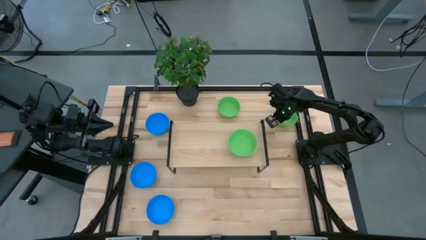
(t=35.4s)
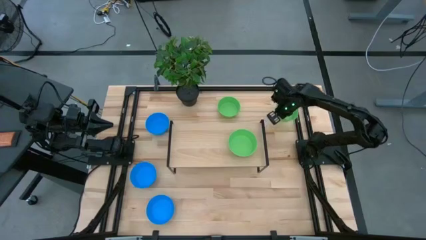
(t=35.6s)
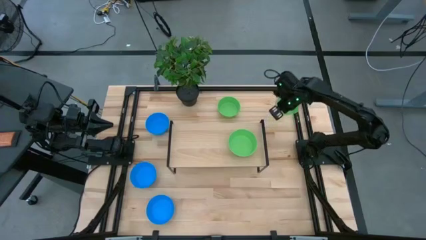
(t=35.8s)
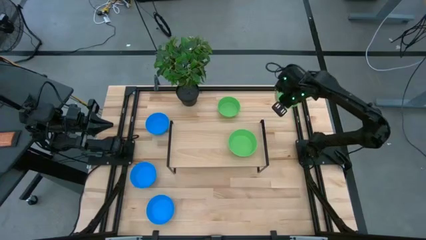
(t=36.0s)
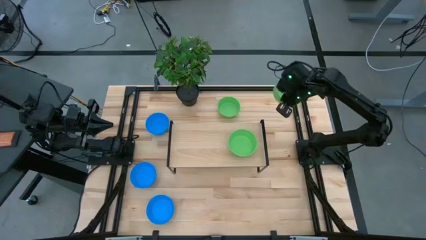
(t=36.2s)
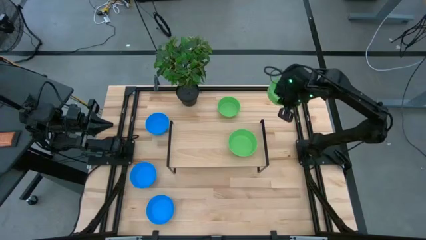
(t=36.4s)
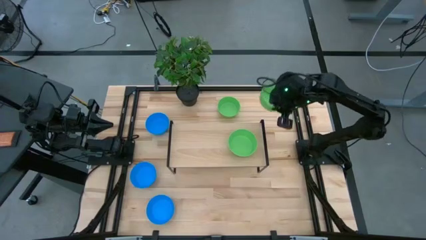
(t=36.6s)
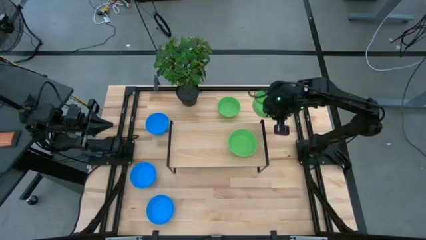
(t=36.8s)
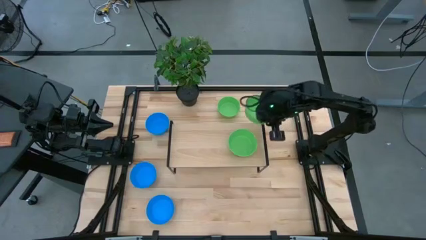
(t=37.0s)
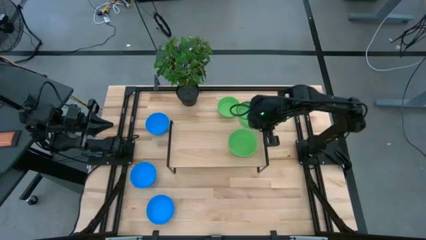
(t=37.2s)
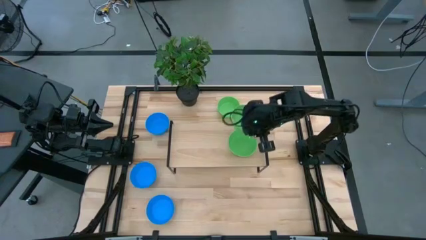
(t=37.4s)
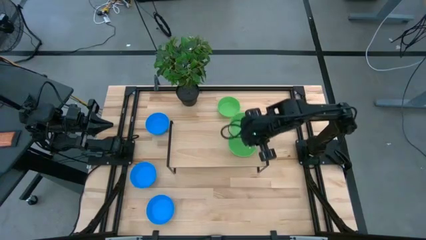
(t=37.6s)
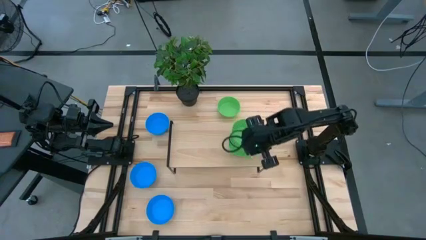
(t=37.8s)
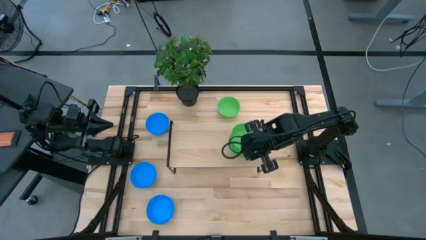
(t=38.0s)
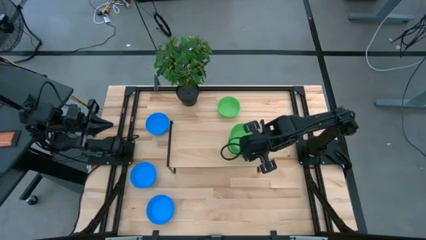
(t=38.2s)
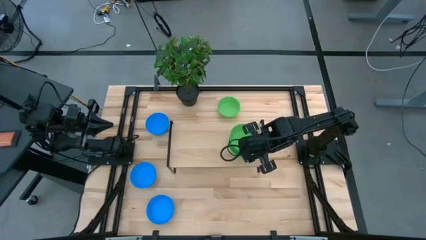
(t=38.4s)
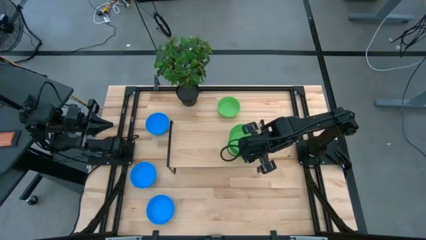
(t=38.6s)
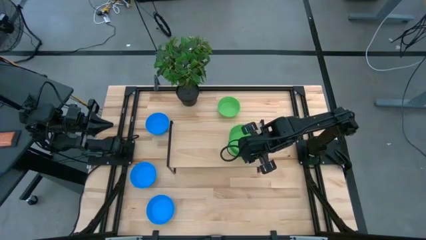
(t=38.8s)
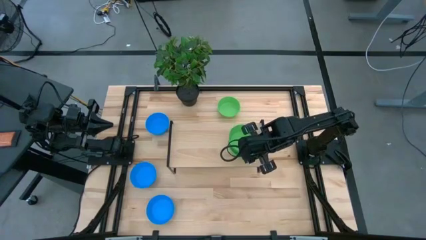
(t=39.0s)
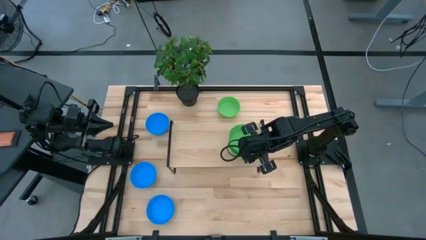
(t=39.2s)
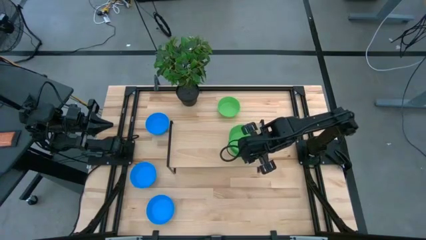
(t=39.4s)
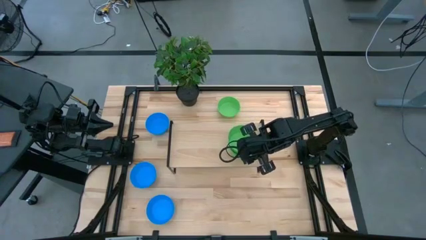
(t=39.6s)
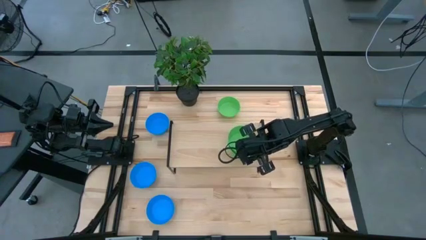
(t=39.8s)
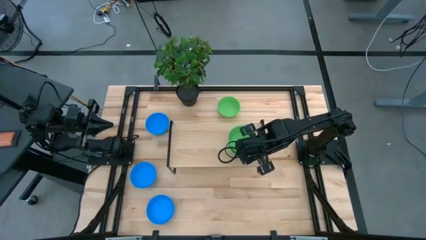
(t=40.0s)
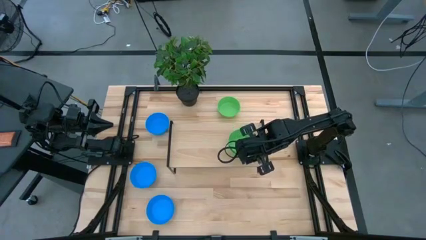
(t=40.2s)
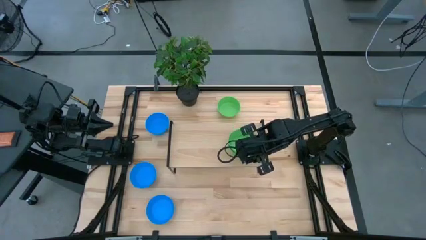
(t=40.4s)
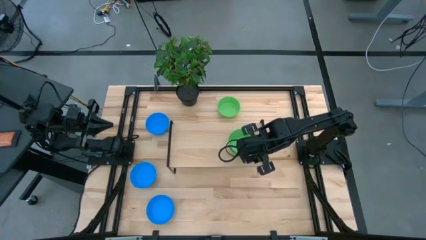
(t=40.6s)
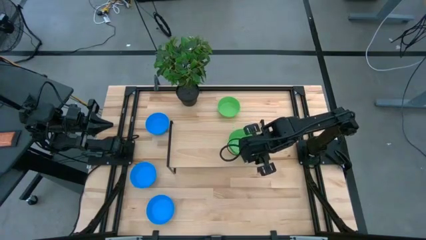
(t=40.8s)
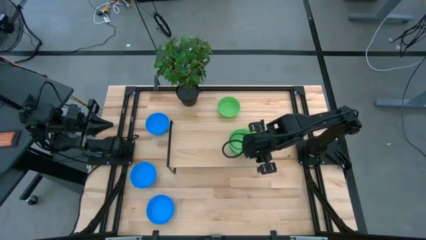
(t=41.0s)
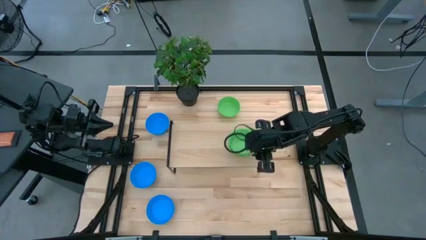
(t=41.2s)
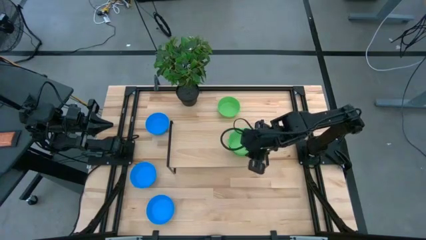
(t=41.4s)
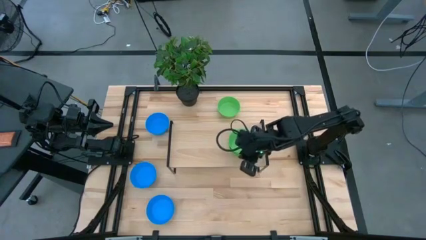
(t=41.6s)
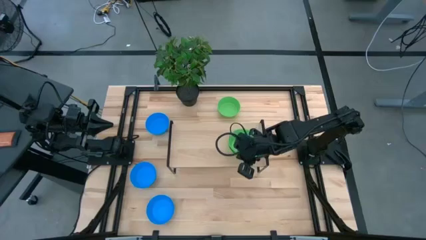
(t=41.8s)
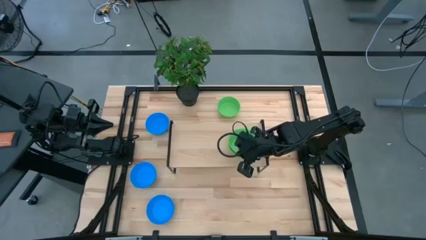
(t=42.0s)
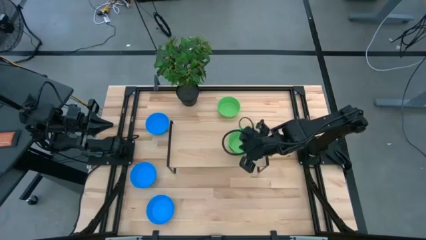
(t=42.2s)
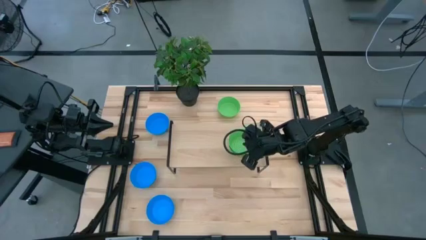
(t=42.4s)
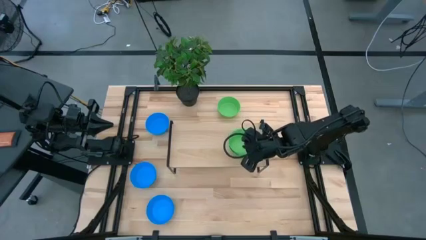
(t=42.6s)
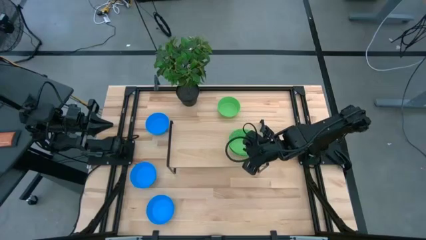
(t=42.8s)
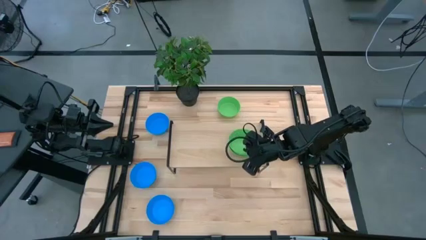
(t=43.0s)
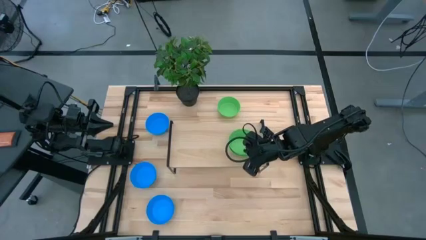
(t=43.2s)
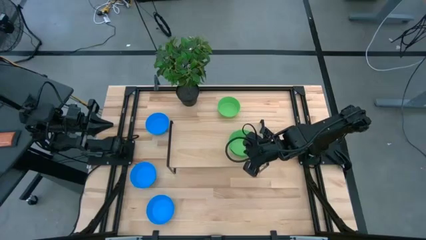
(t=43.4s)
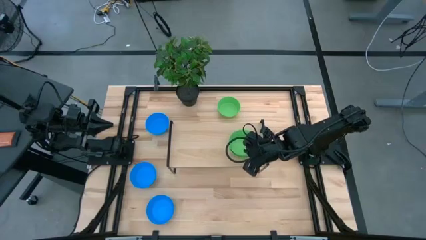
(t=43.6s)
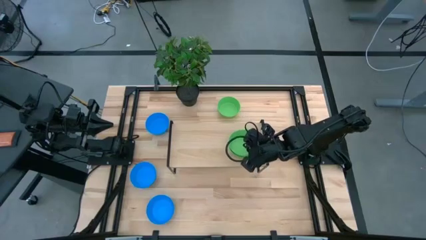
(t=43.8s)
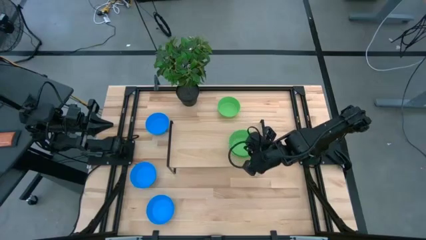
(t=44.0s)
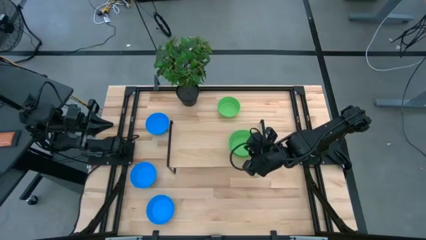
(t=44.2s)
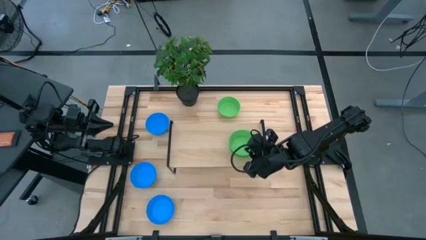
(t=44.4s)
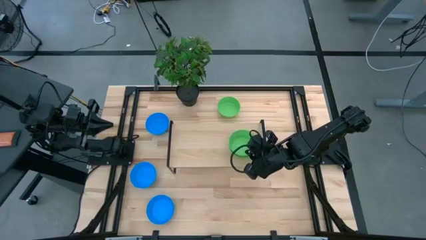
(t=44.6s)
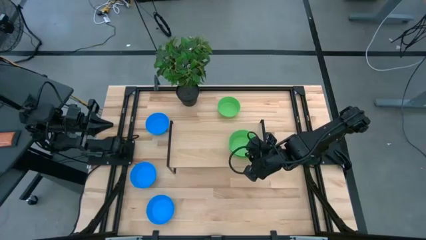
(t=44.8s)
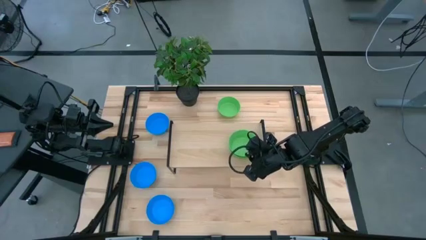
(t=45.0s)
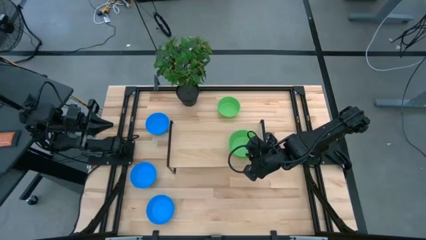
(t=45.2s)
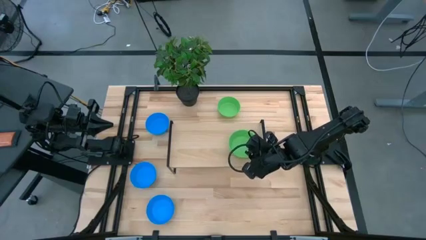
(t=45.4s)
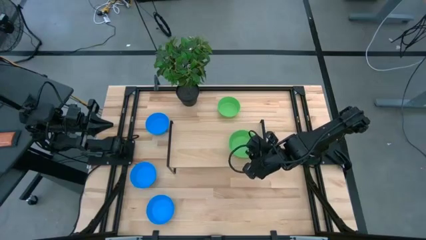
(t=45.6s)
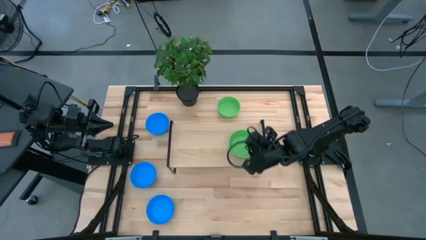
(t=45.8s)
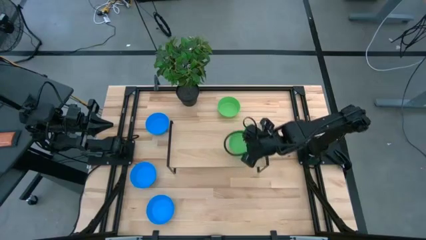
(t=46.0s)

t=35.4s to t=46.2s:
Task: Pick & Place Mini bowls
Stack the right green bowl on the green bowl on the shelf
